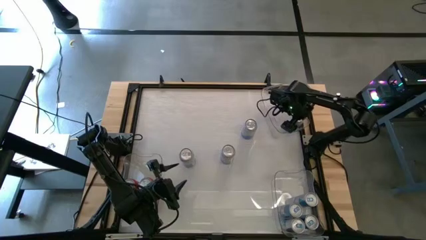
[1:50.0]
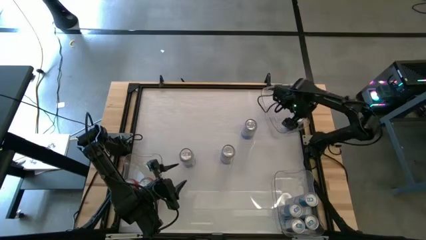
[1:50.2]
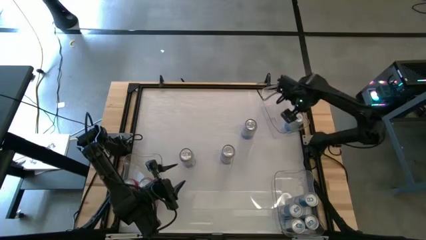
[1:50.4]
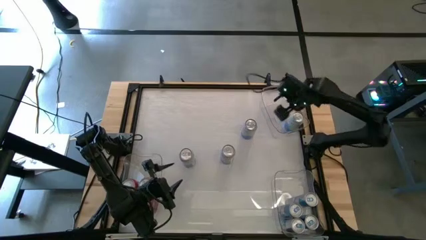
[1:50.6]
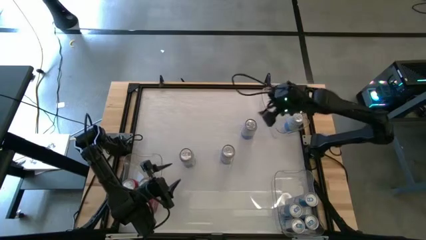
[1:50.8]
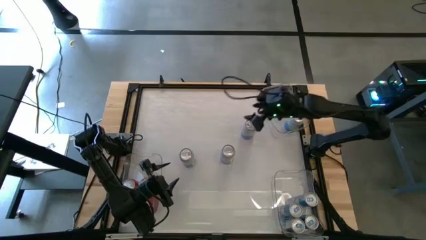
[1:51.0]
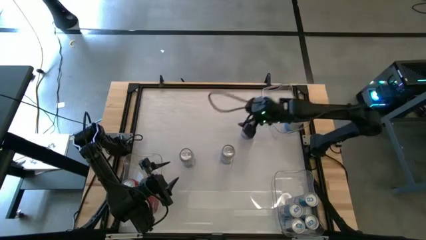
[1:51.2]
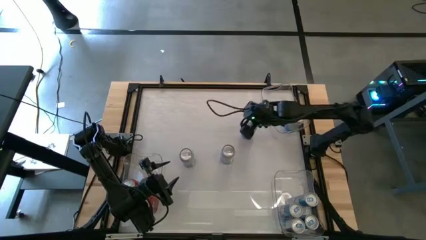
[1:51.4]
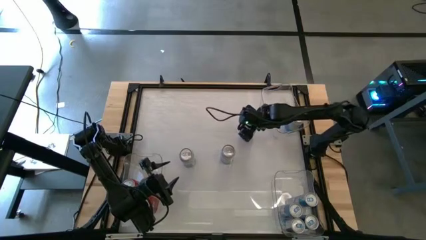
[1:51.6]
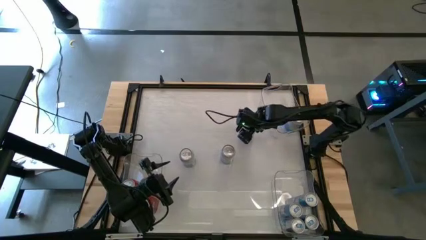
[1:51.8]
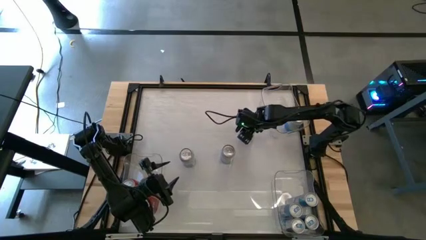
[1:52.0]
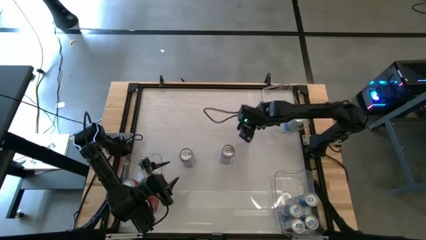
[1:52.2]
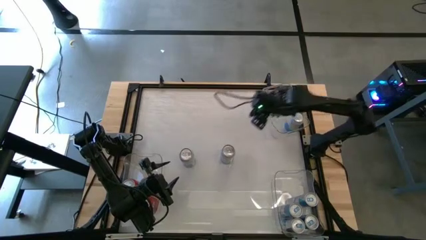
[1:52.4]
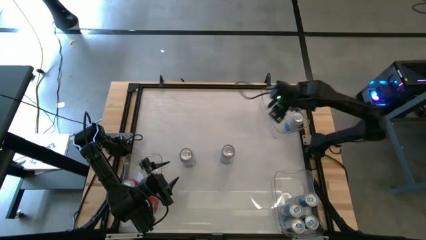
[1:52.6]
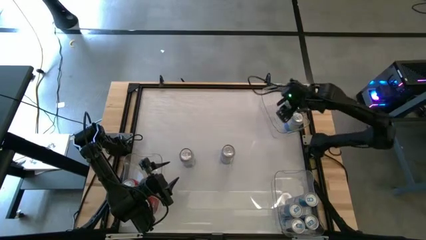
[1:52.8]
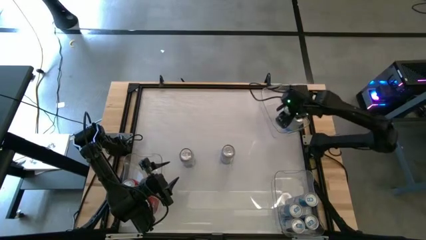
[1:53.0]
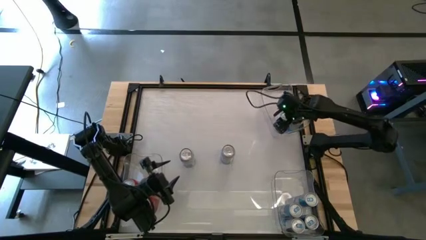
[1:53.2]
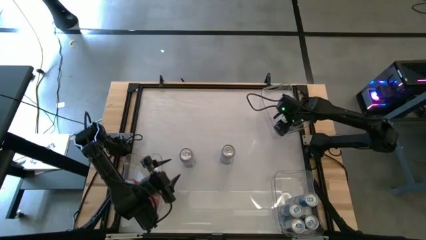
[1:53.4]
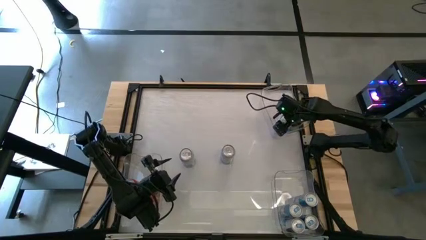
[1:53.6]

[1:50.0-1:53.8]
Task: Sort soda cans
Put the top right blue-white soda can into the top right transparent bin

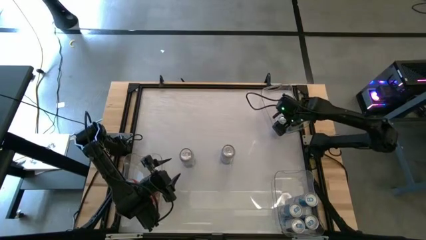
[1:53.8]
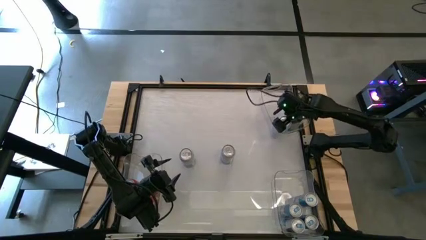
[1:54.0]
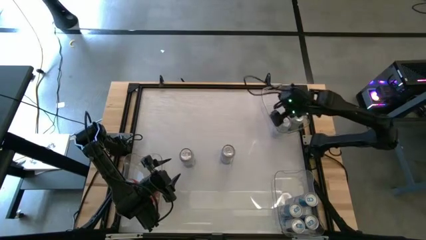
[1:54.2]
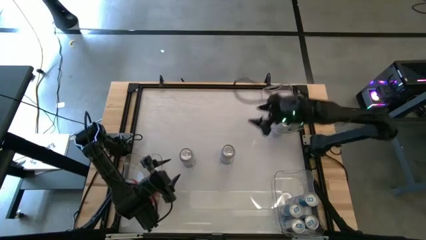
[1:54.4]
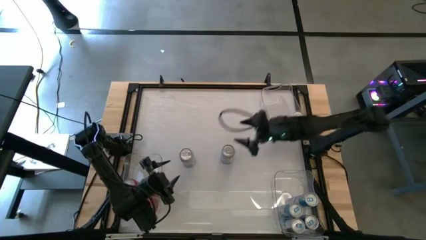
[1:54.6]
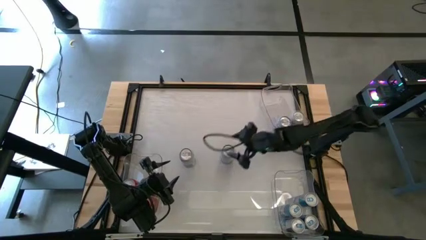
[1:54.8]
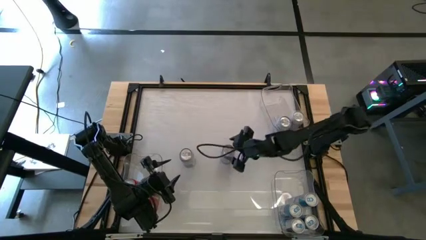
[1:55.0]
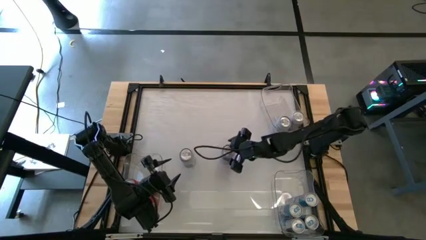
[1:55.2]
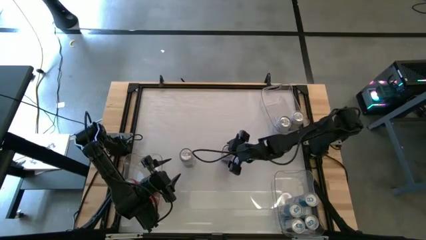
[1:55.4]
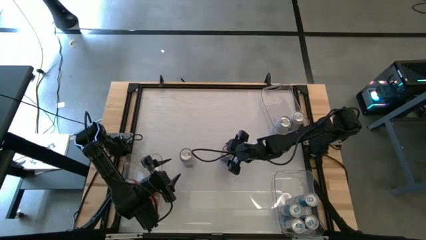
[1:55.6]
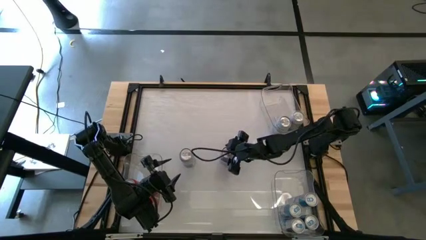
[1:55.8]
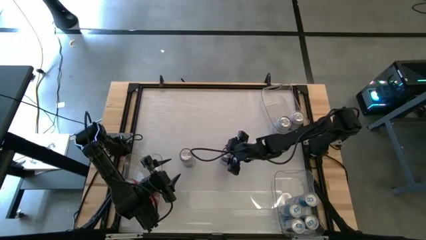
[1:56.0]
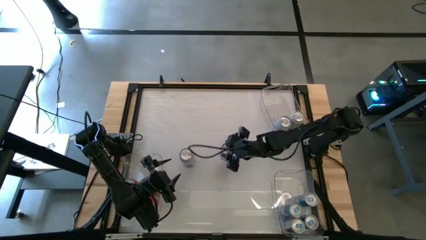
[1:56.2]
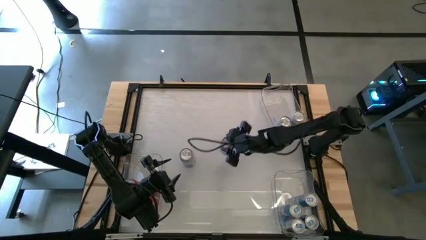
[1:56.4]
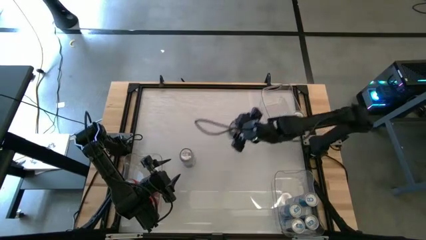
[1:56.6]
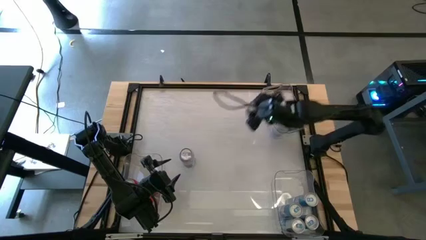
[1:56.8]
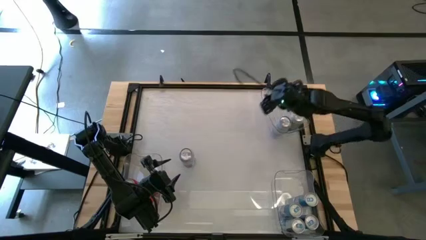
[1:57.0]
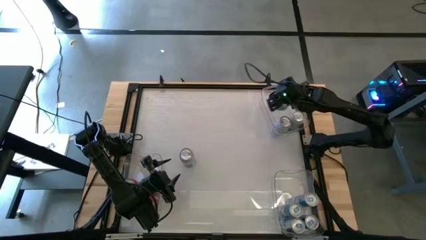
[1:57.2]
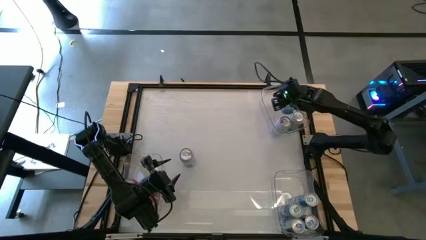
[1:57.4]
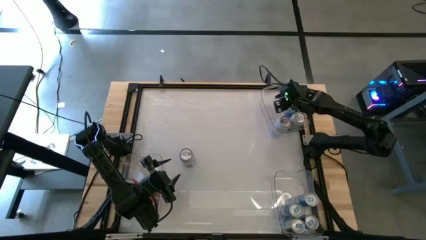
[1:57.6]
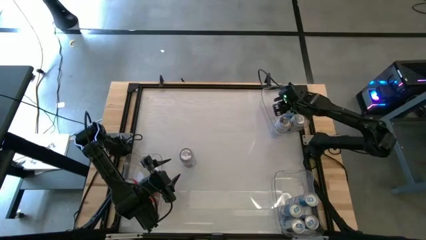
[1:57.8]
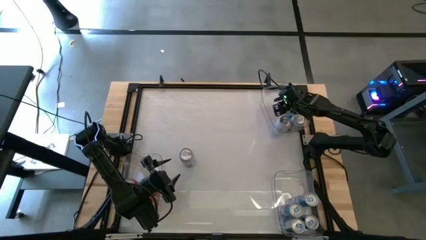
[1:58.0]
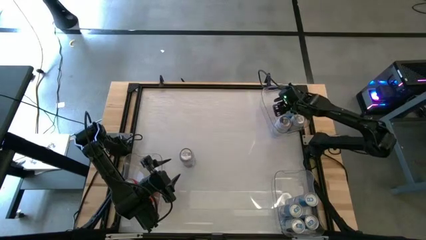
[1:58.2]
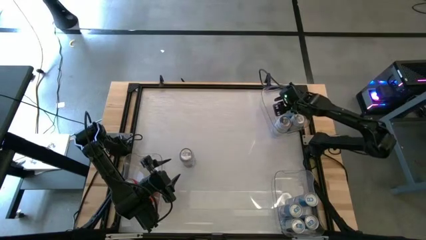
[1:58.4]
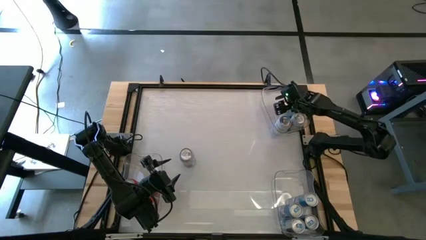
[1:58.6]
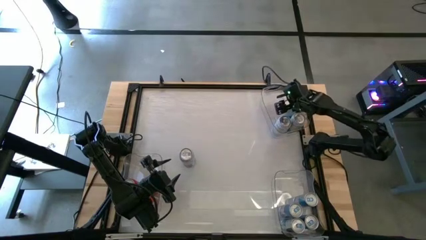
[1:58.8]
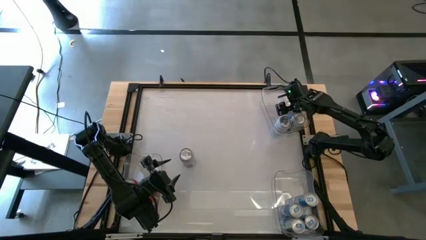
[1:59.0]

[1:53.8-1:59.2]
Put the middle right blue-white soda can into the top right transparent bin

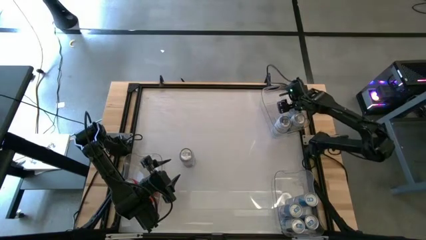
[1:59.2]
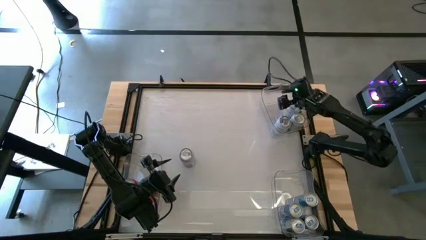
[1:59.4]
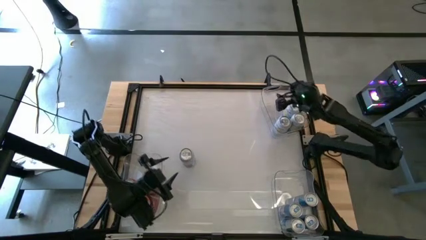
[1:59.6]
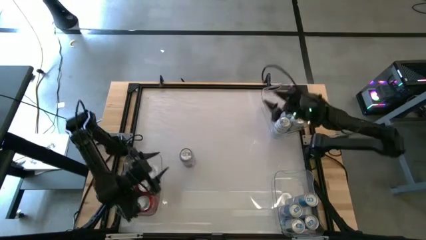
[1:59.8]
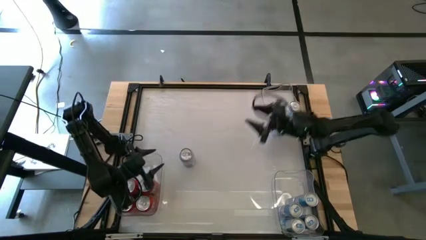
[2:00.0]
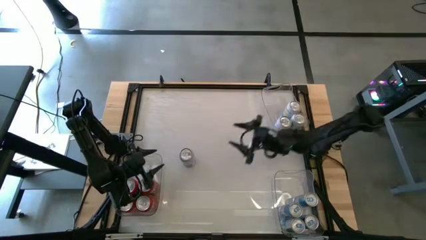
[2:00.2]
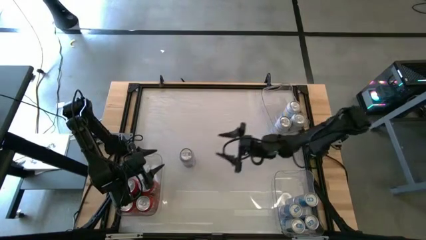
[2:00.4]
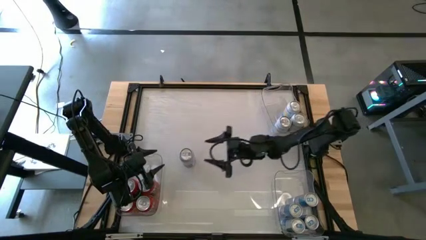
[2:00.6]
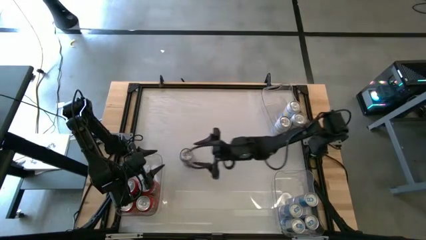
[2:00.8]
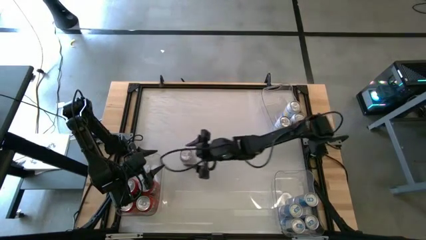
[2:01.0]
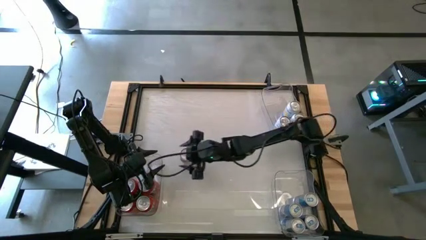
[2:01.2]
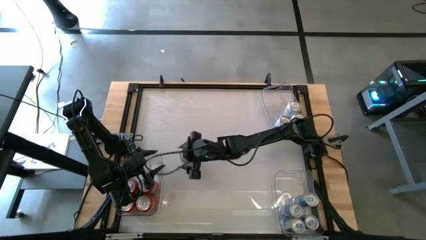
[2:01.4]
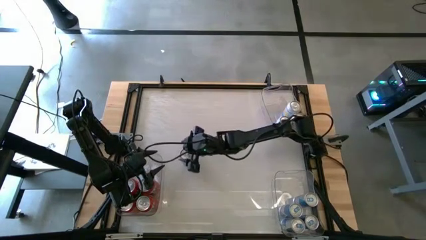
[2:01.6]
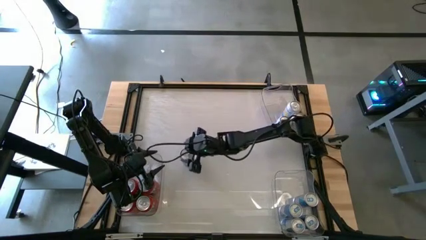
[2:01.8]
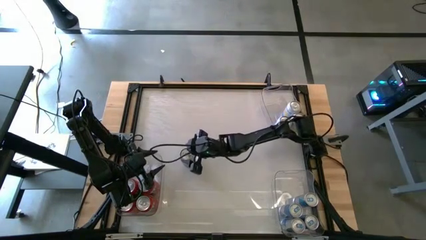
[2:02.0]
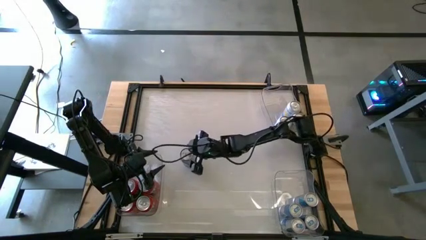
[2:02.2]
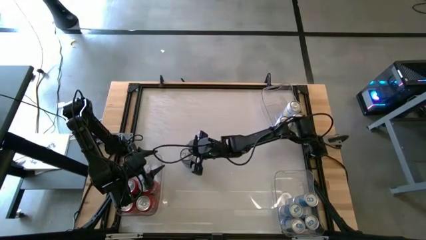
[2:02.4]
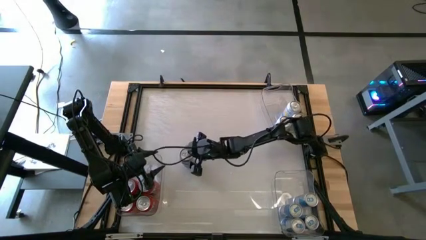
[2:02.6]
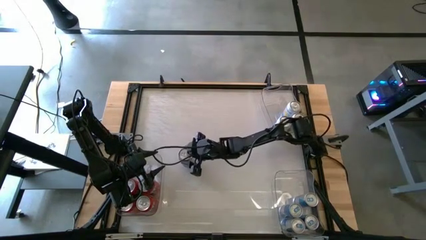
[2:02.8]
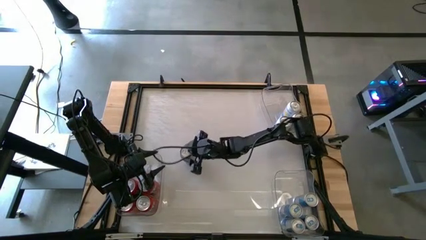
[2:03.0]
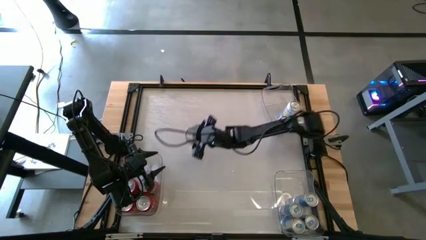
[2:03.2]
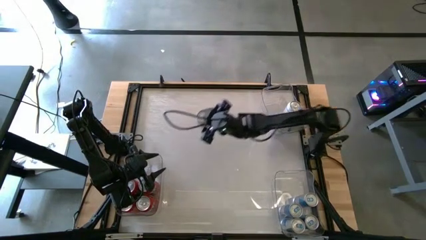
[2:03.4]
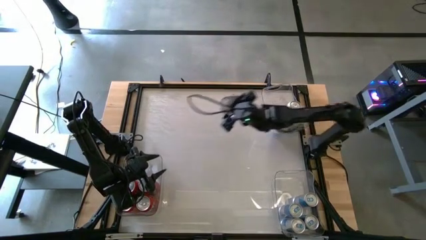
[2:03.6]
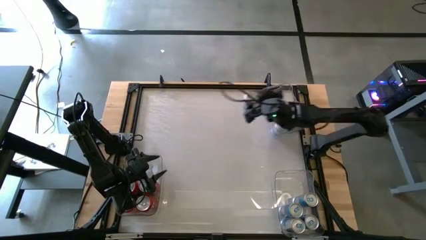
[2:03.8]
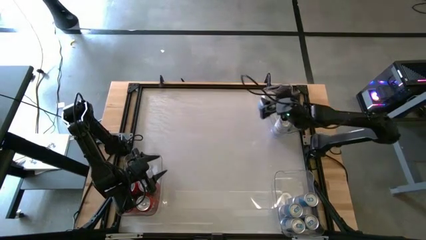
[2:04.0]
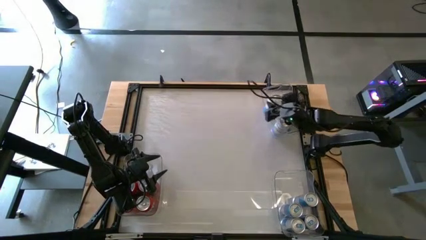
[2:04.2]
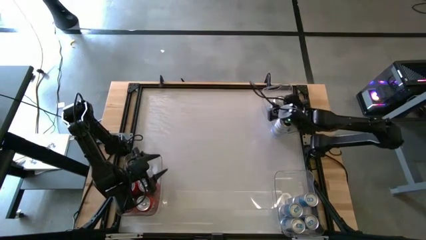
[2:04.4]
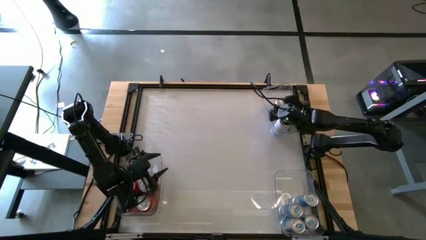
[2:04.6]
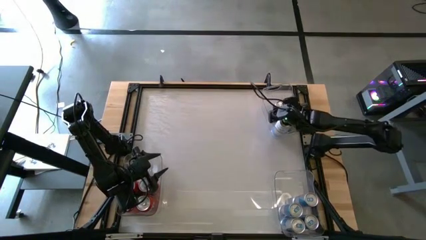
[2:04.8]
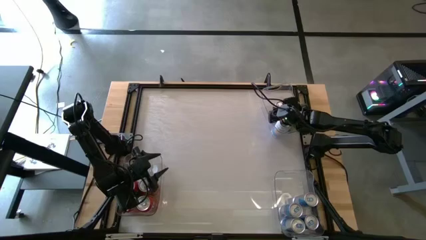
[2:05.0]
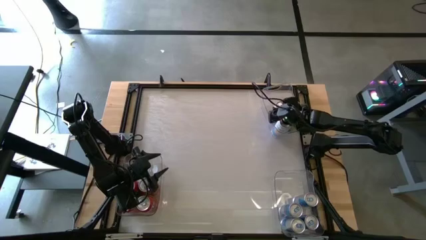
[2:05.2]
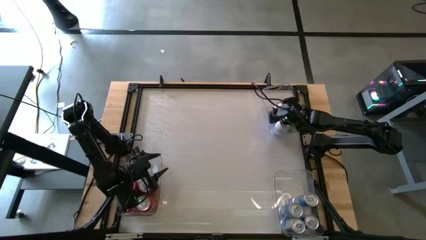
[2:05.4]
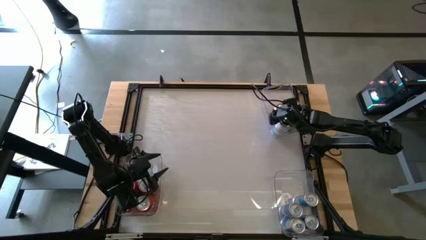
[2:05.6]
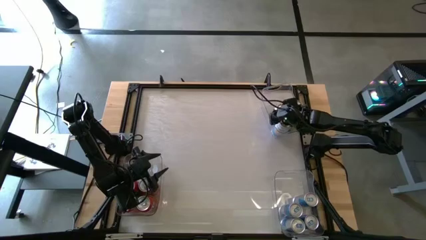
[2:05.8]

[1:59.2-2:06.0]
Put the middle left blue-white soda can into the top right transparent bin

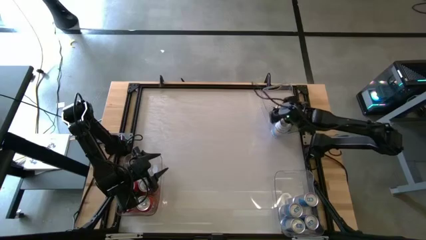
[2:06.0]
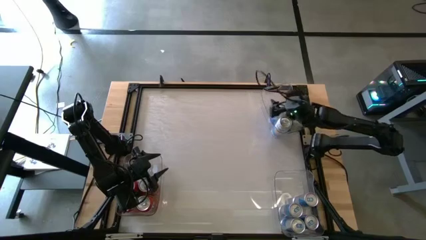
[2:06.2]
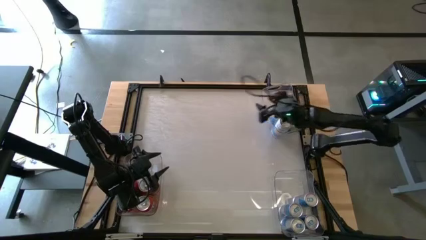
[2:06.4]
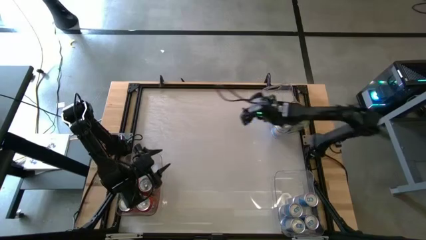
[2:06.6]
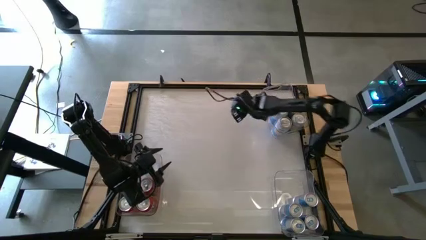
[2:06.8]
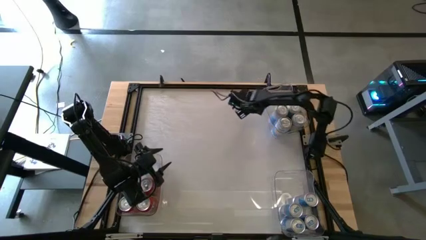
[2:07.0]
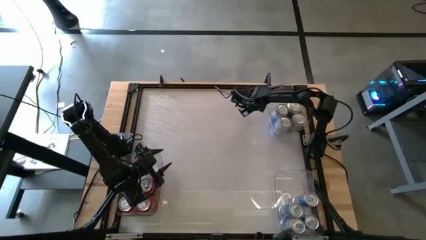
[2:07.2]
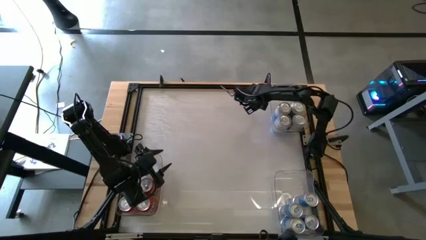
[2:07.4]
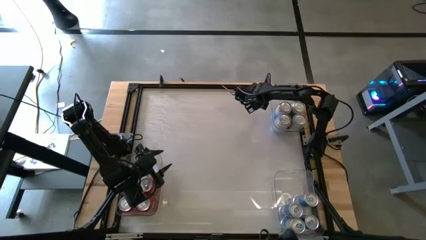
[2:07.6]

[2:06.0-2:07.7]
Adjust the top right transparent bin
